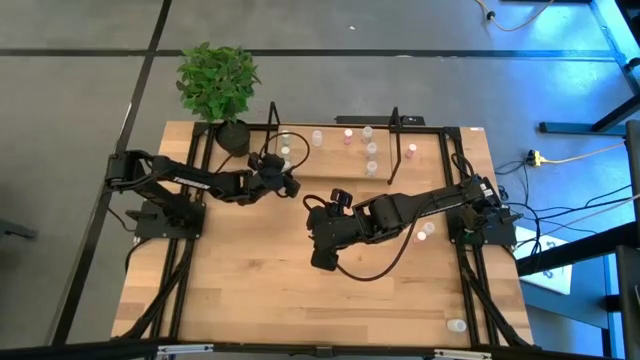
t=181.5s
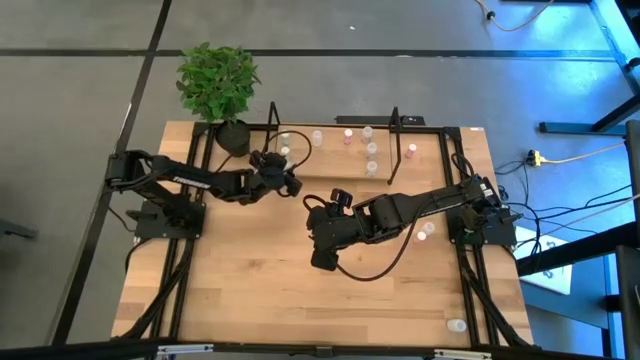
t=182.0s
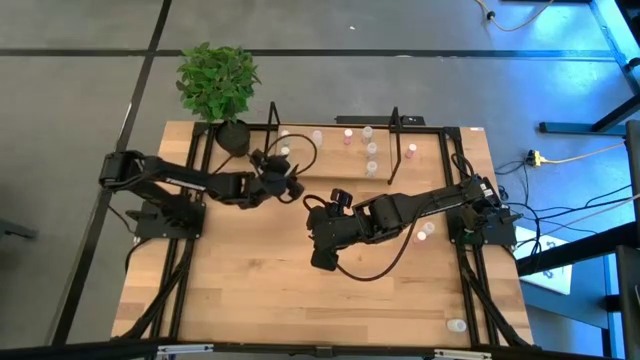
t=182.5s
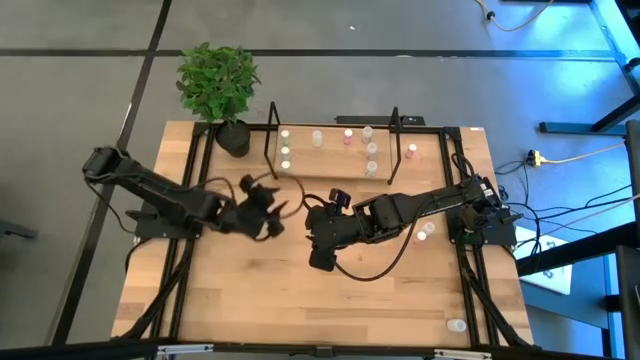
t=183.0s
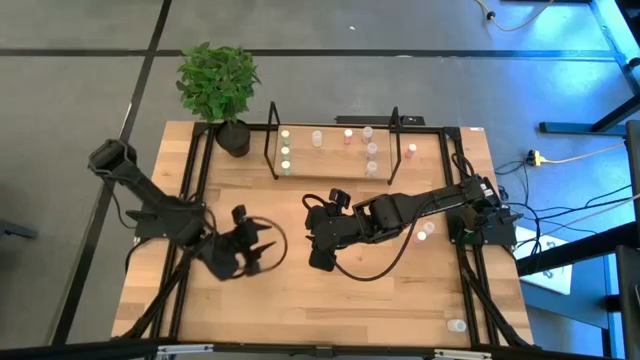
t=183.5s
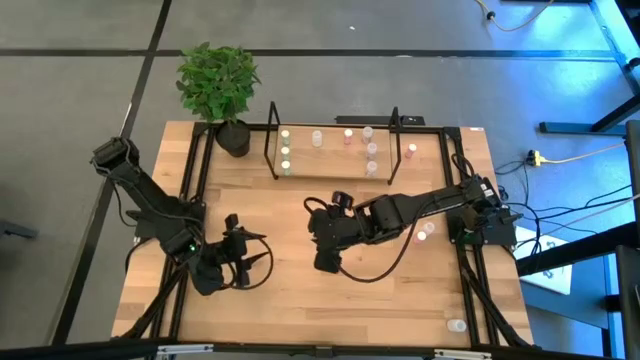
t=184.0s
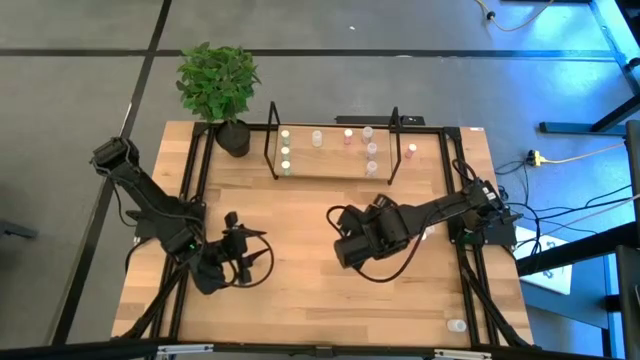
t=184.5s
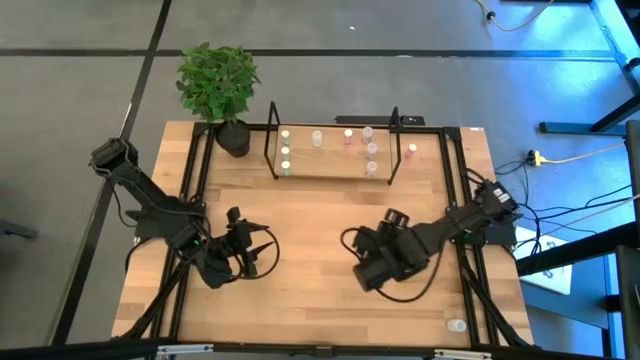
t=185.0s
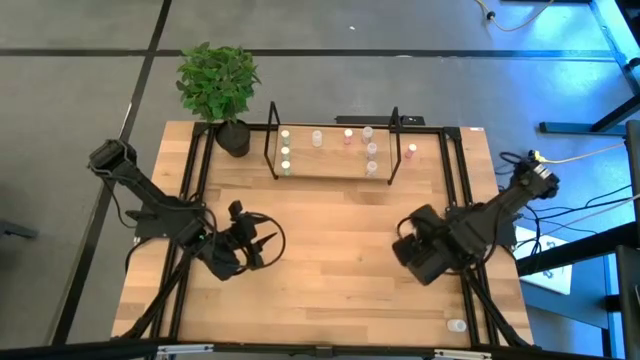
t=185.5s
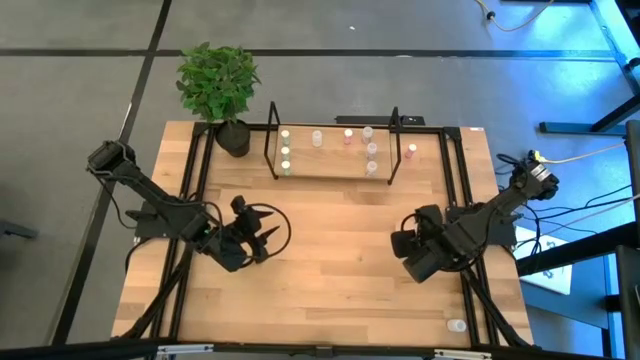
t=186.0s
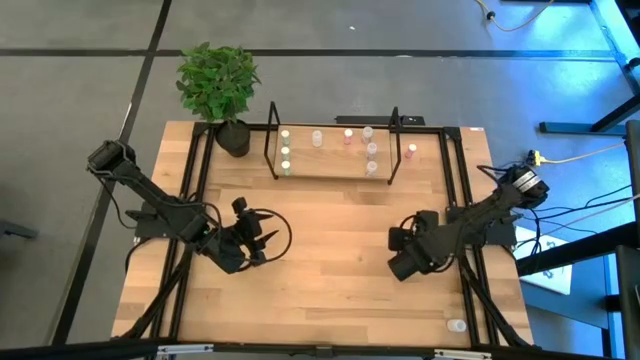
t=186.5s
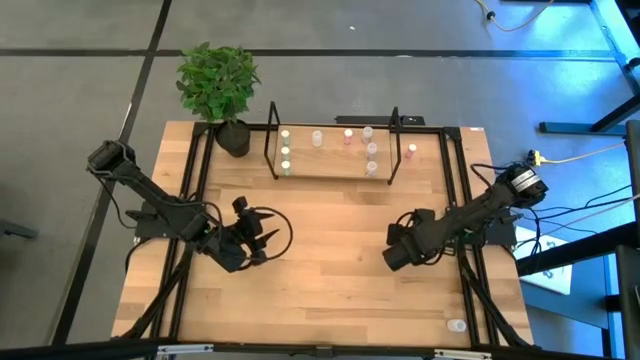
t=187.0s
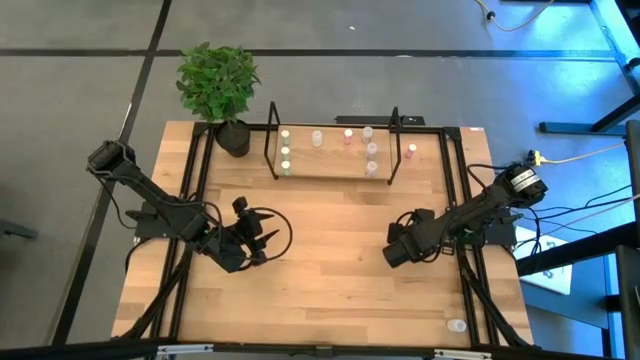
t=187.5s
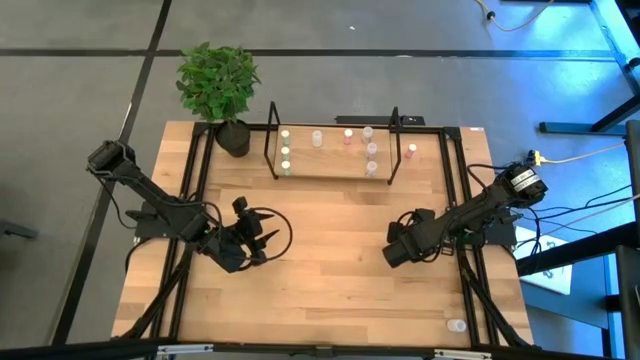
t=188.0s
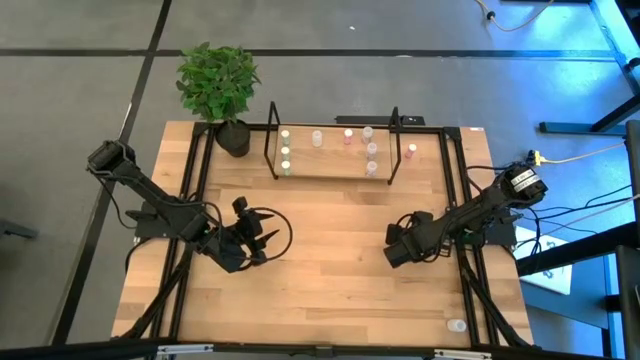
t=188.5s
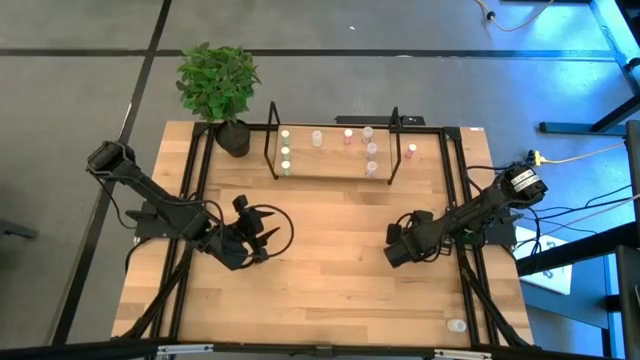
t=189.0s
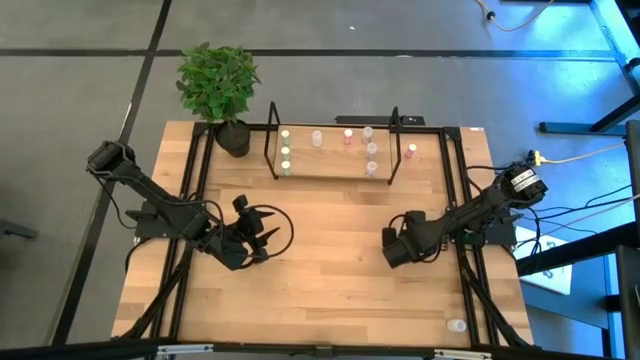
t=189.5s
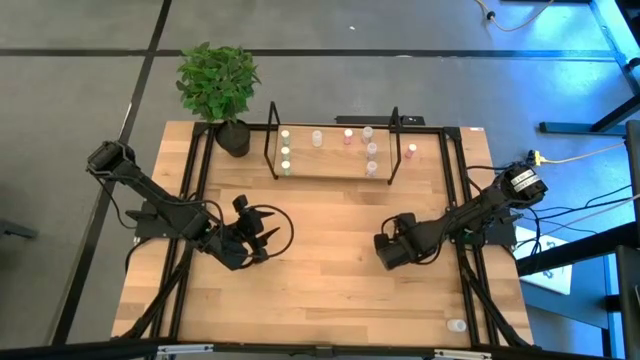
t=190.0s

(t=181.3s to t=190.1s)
Task: Pick and place medicine bottles onto shelf by color
Put the bottom pink medicine bottle on the shelf aligned with the other pink medicine bottle

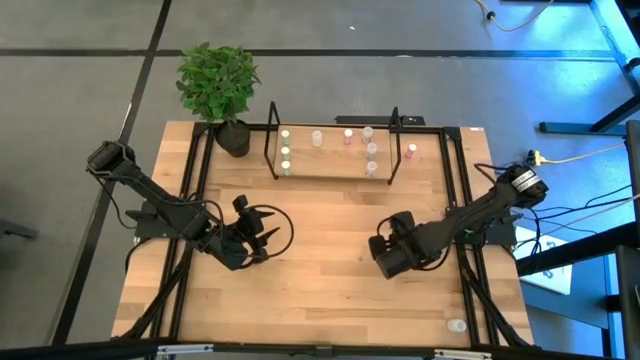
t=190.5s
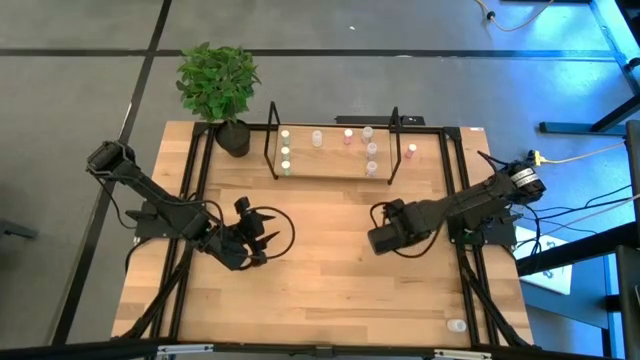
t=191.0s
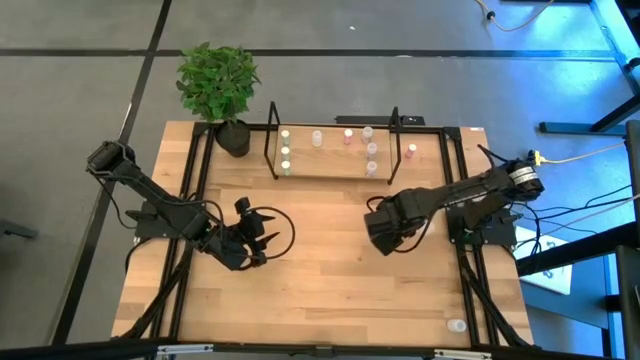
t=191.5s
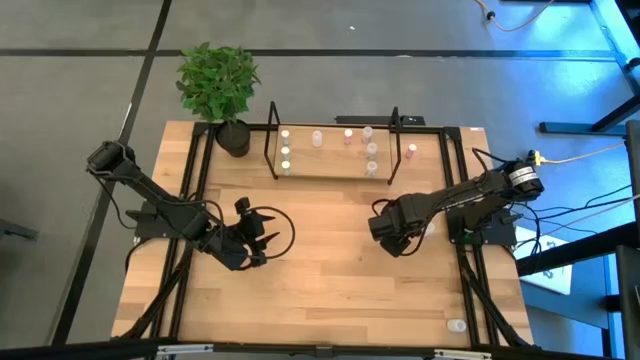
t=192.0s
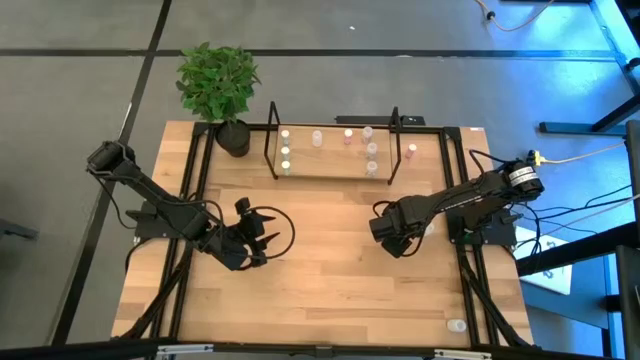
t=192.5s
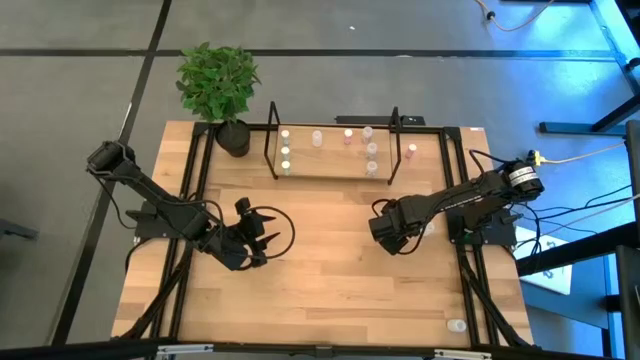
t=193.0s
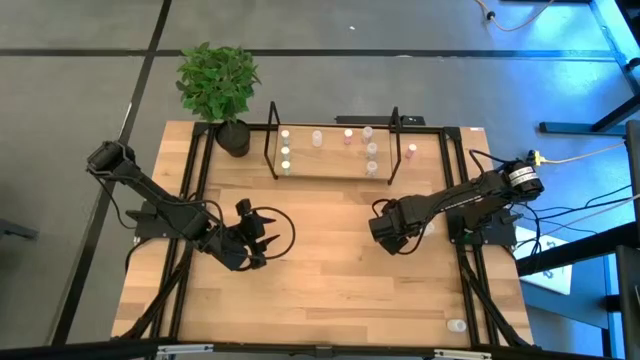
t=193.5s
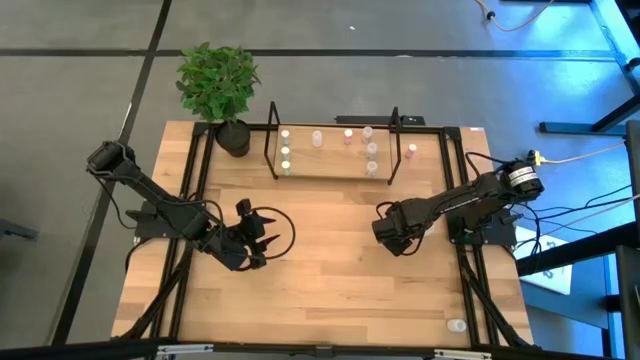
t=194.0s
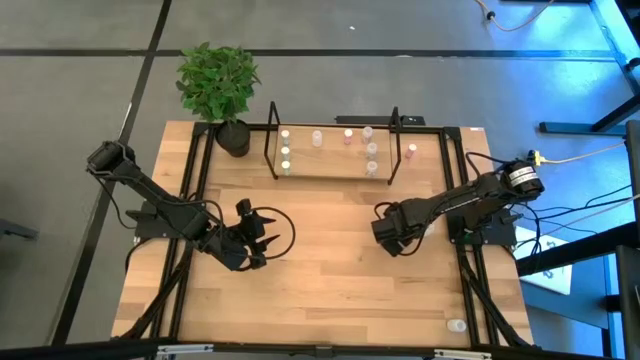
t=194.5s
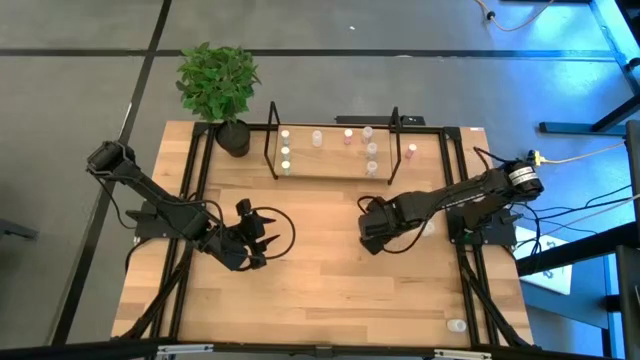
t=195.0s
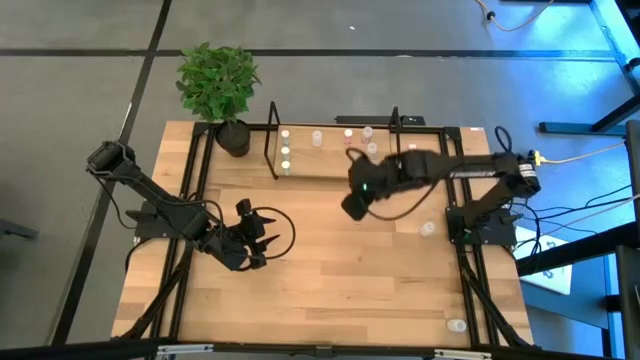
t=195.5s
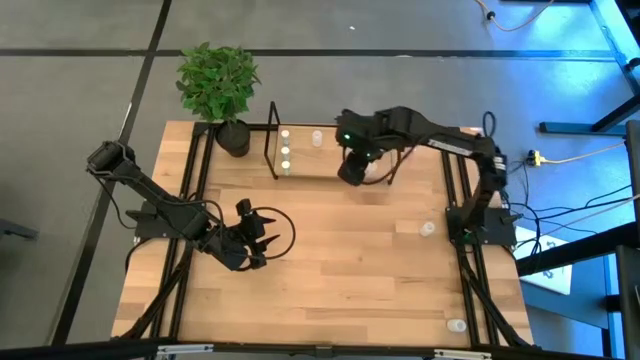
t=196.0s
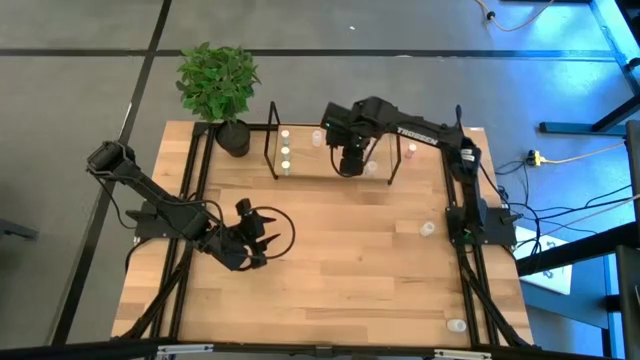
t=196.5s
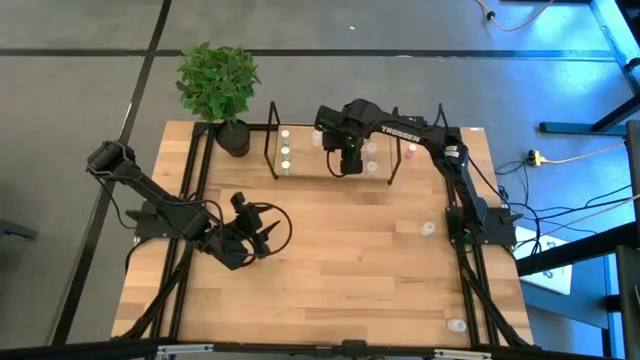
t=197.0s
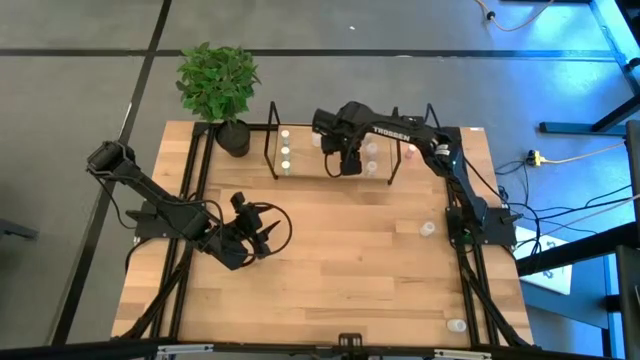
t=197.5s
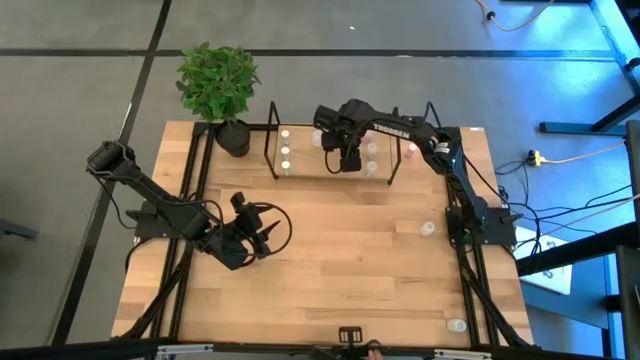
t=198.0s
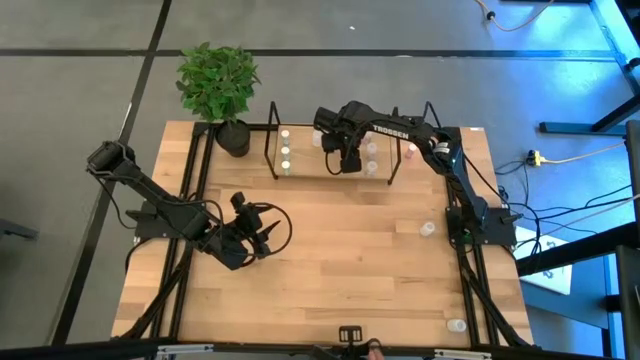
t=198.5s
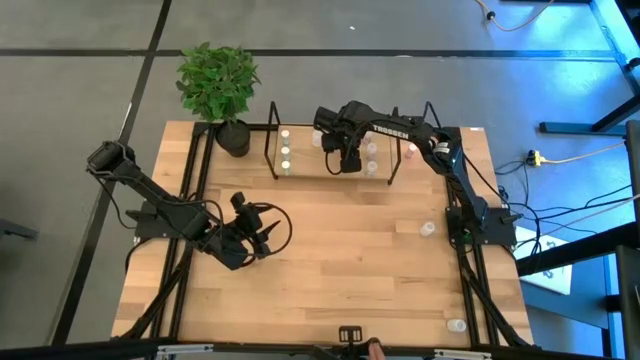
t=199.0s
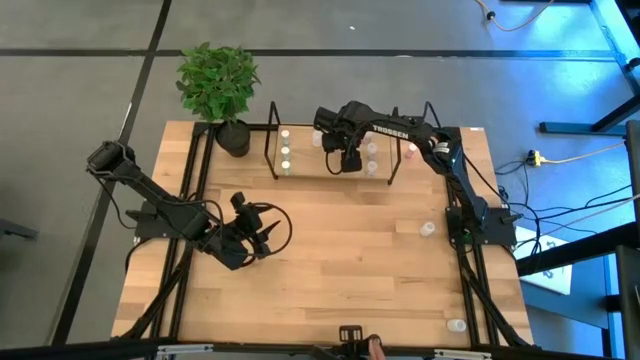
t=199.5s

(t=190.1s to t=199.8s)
Put the bottom pink medicine bottle on the shelf aligned with the other pink medicine bottle

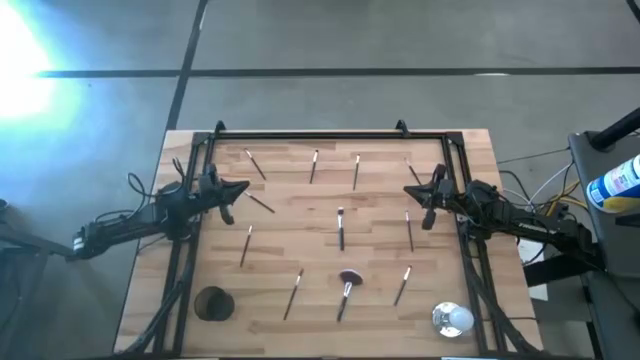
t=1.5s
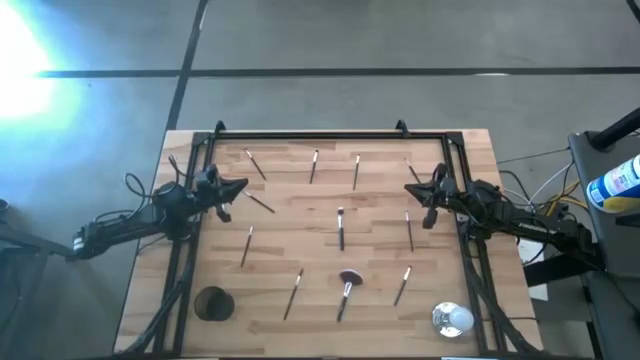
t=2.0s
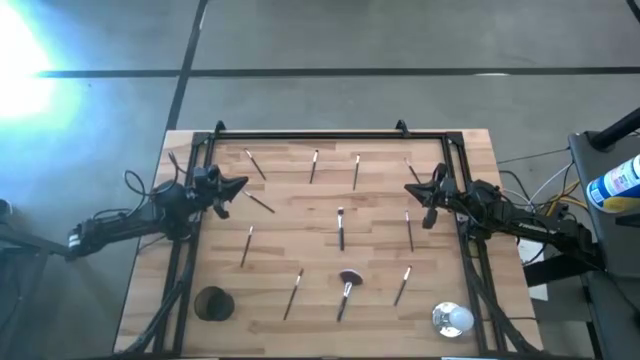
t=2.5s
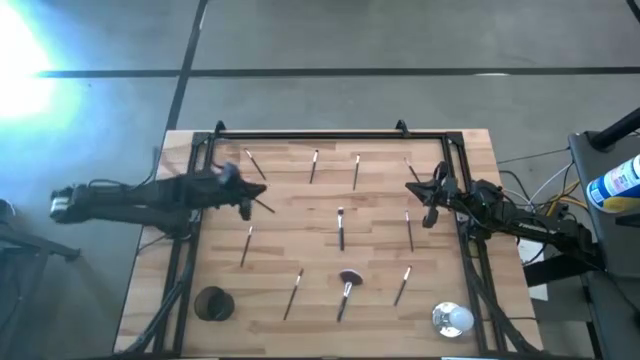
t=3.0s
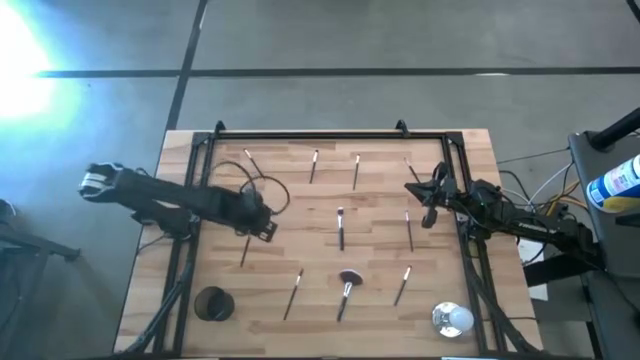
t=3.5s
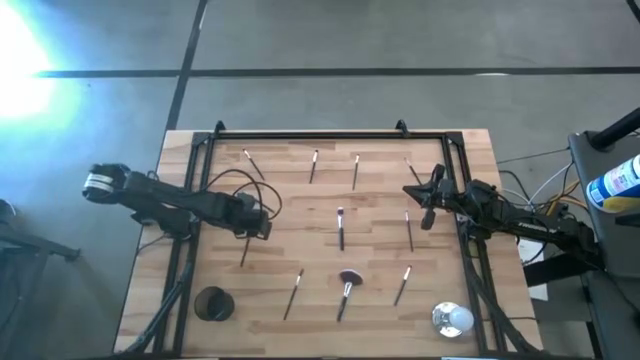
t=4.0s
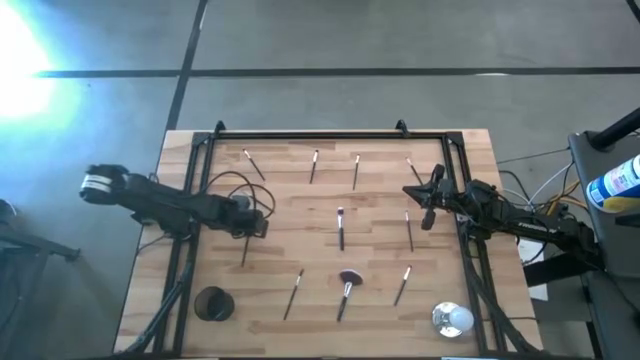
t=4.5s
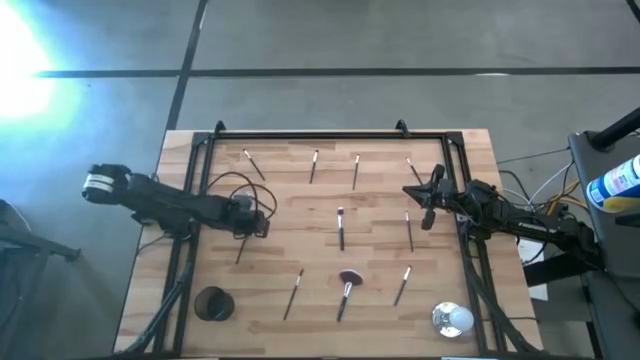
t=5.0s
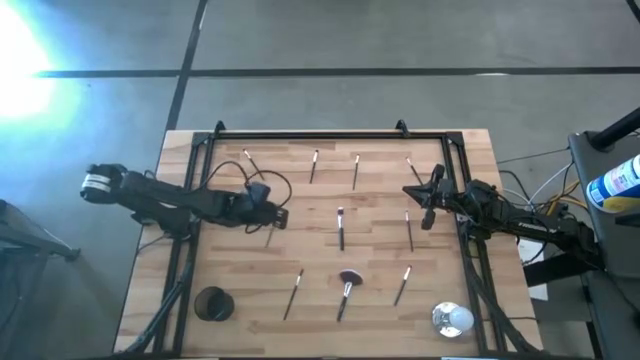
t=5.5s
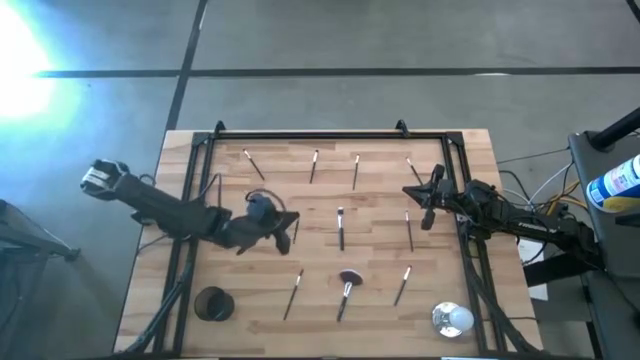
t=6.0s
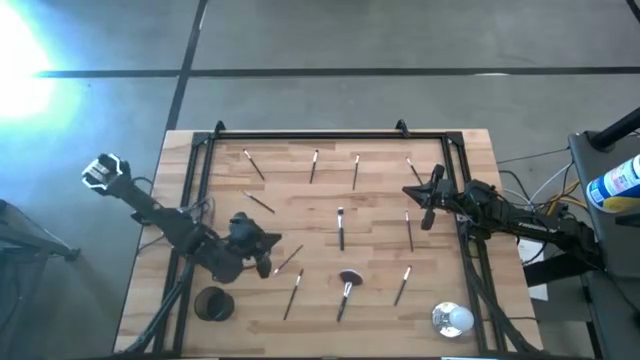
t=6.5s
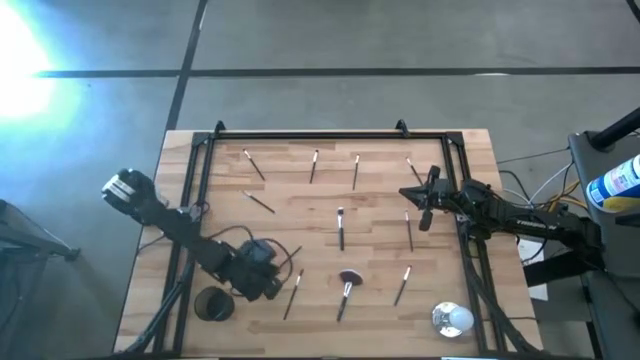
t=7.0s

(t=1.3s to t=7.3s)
Task: Pick & Place Makeup Brushes
Put the black liner brush into the makeup holder
